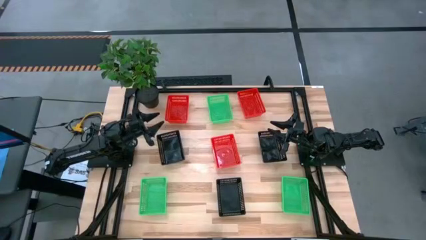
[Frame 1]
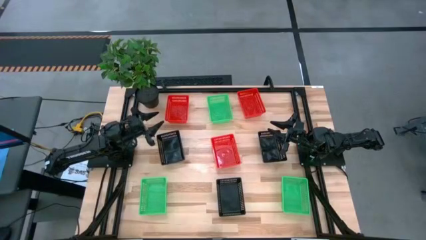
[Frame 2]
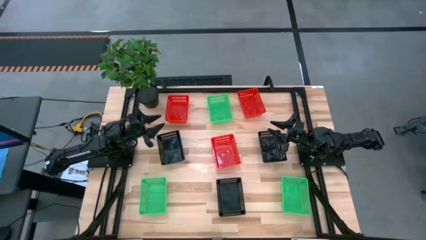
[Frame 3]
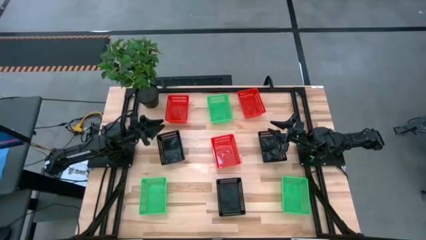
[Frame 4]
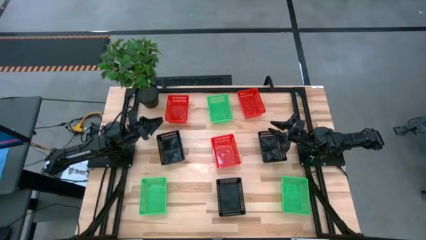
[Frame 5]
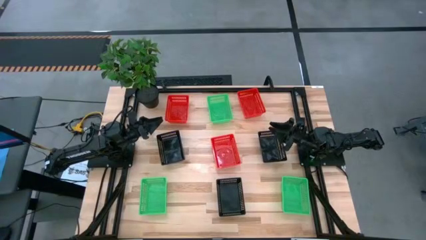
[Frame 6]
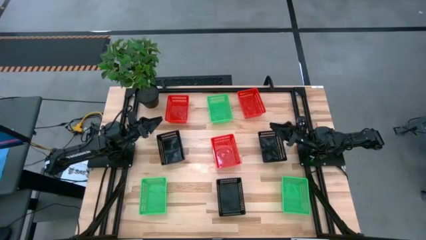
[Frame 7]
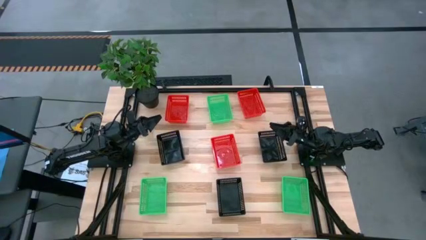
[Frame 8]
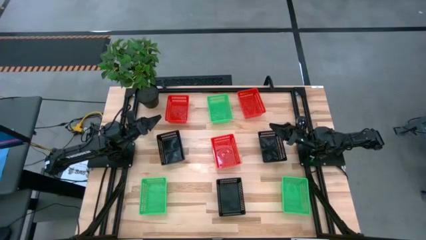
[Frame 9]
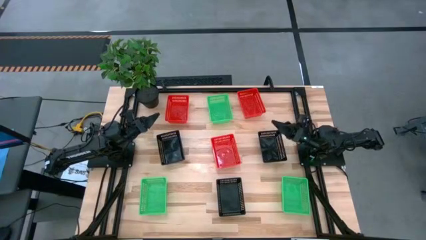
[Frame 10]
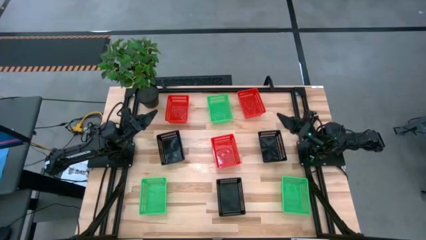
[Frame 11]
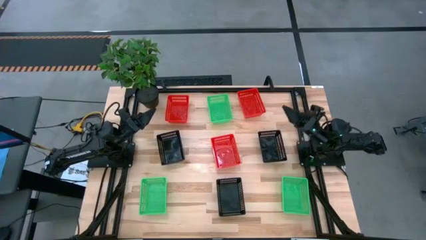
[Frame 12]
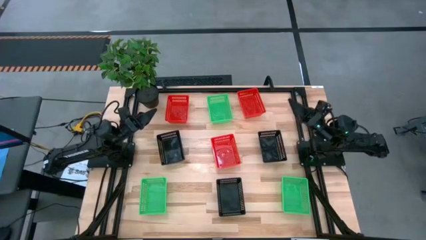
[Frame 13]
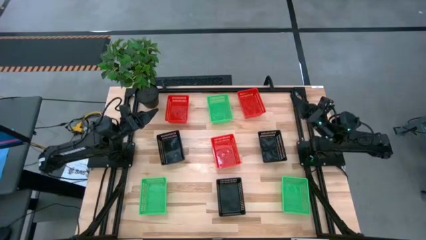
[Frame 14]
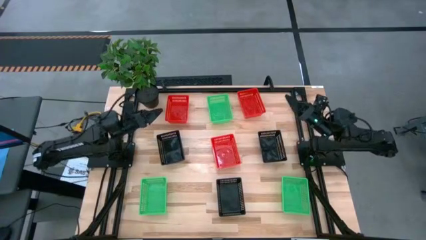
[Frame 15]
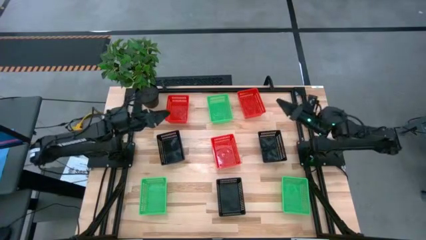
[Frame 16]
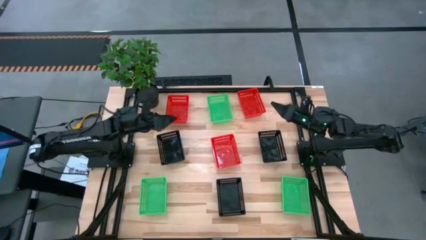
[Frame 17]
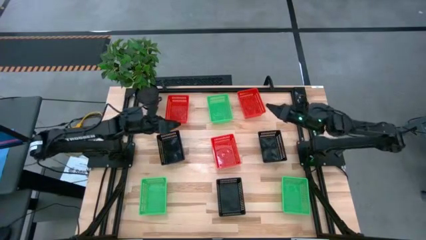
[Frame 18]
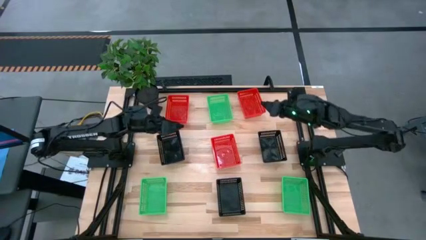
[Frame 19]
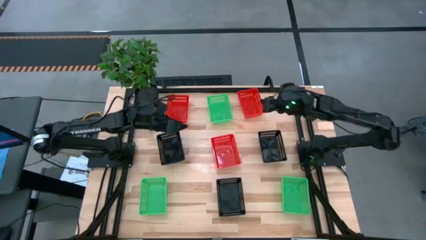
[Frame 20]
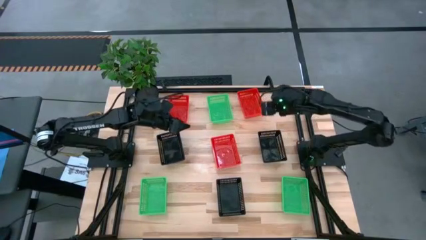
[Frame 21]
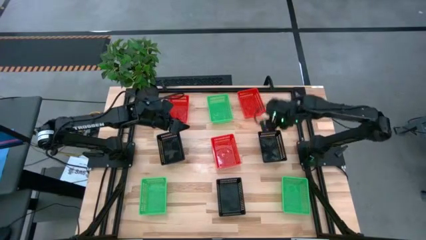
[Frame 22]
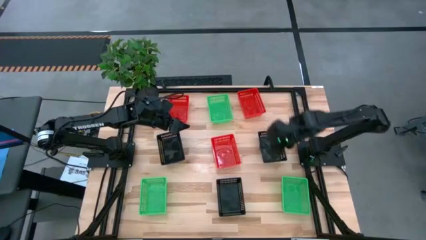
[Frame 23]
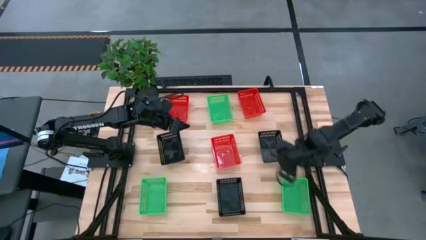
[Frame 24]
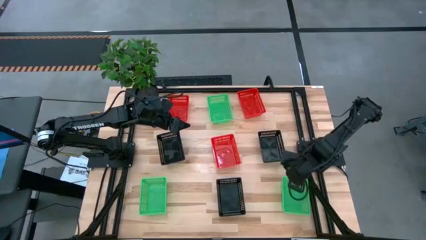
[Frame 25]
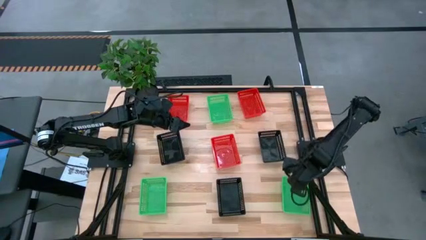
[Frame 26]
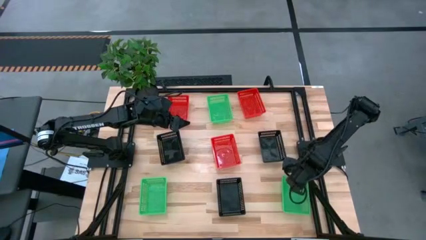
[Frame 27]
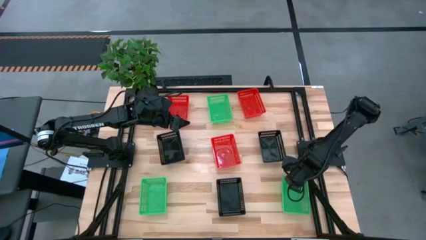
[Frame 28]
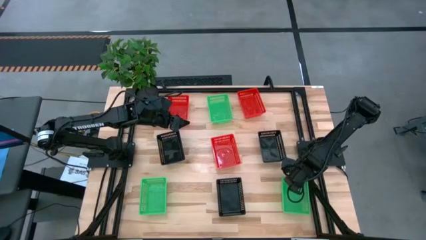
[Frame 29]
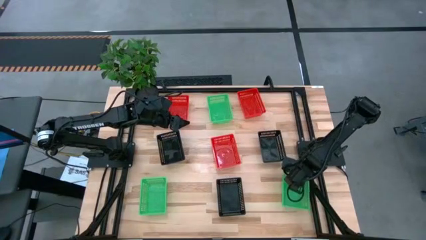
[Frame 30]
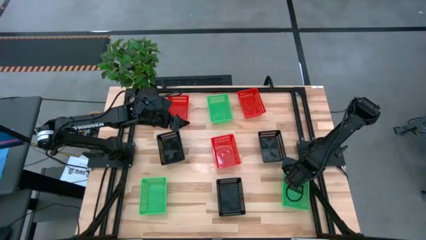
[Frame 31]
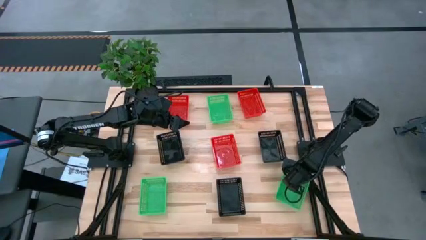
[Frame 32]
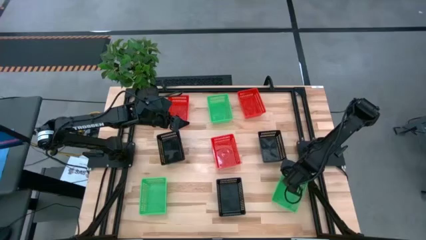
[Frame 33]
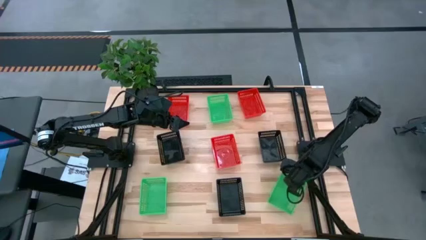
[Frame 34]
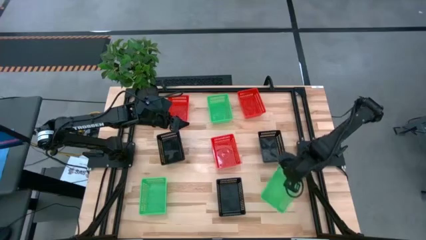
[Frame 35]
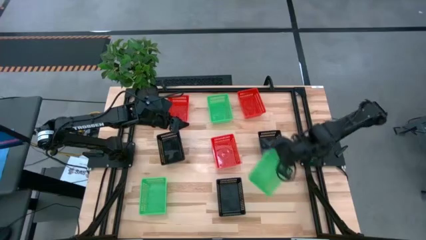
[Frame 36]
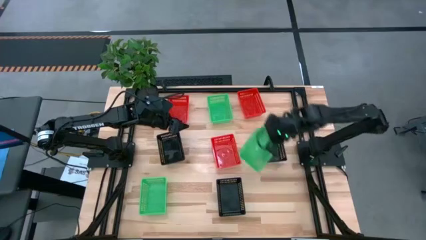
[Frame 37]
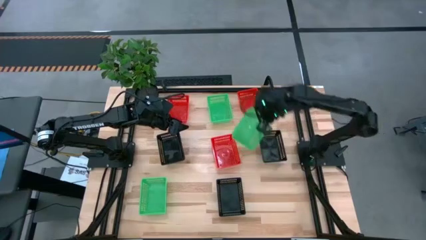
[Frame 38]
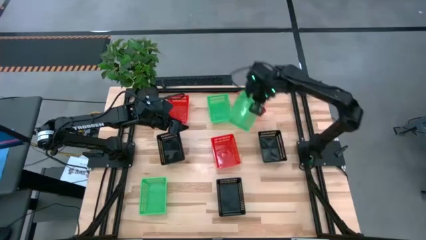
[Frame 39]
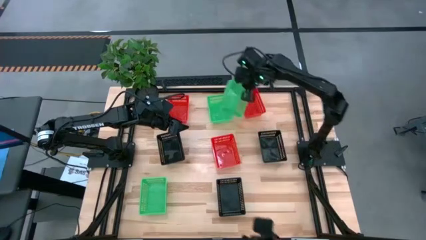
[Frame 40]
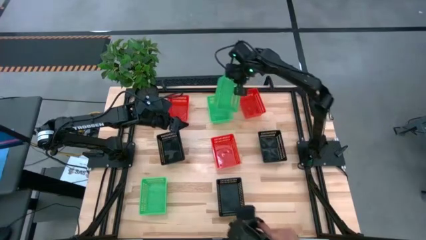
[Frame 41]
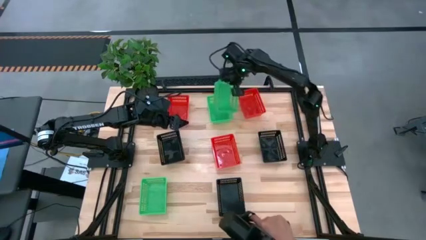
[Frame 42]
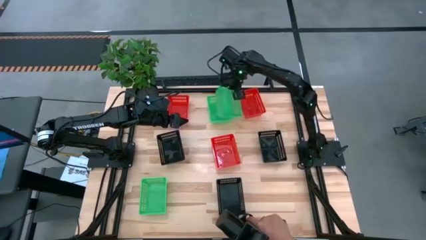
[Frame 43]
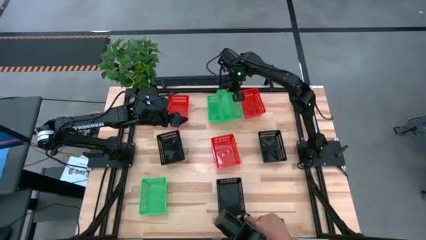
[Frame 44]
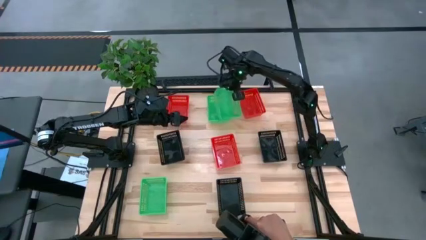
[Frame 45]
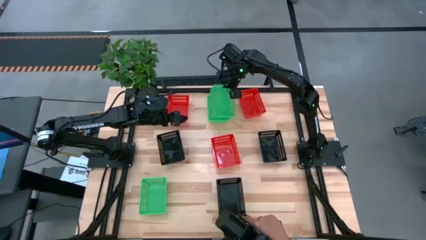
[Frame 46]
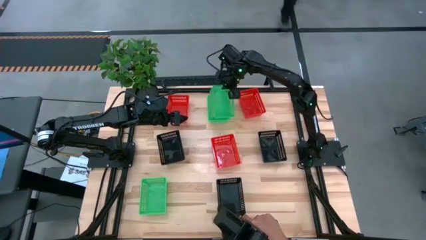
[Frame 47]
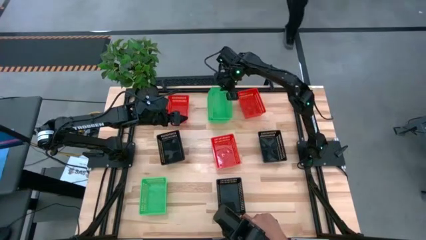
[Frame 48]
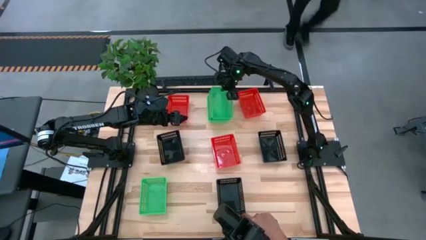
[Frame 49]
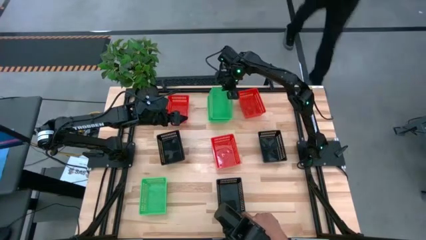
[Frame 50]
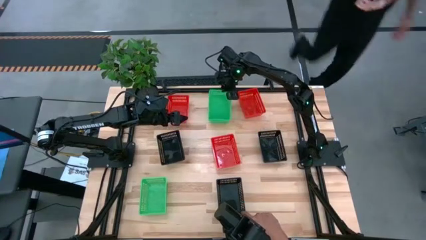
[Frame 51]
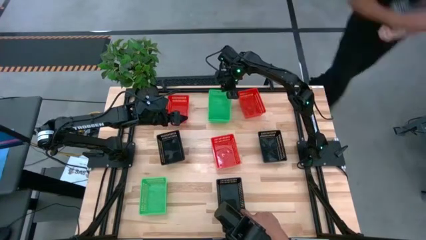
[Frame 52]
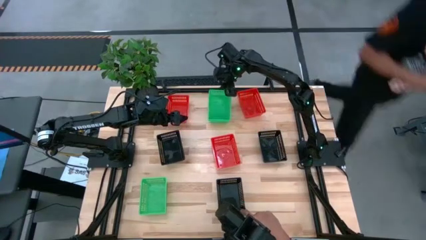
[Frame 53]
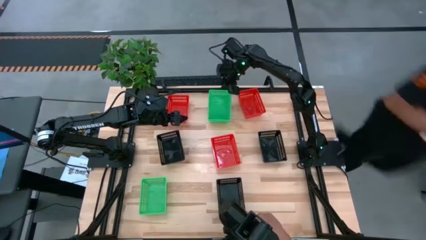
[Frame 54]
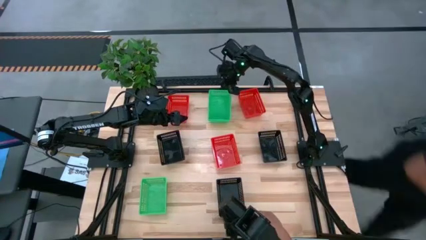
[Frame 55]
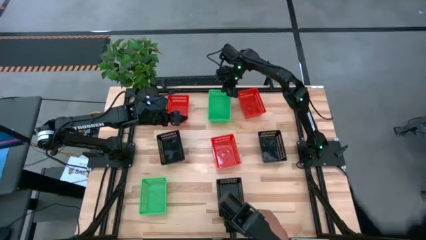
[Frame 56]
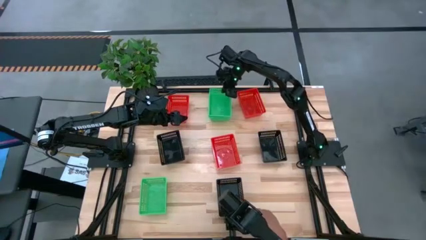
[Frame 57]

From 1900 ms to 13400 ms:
Stack the bottom right green bin on the top green bin
